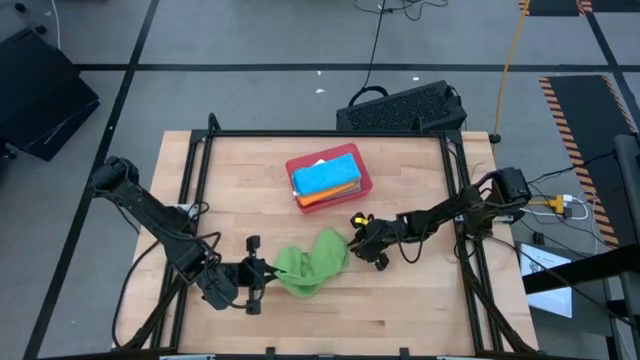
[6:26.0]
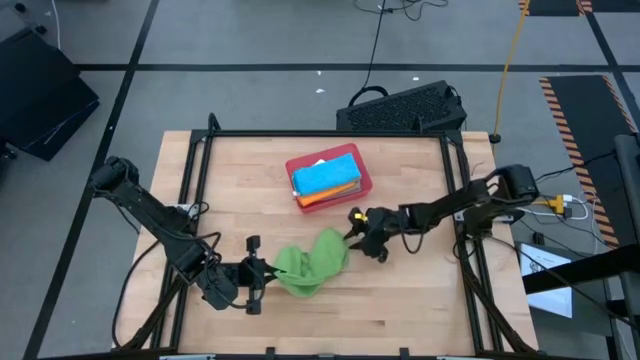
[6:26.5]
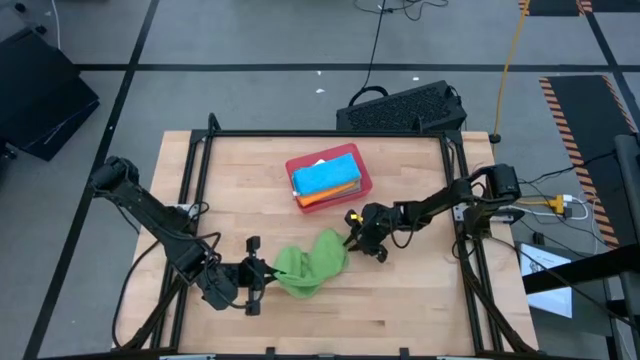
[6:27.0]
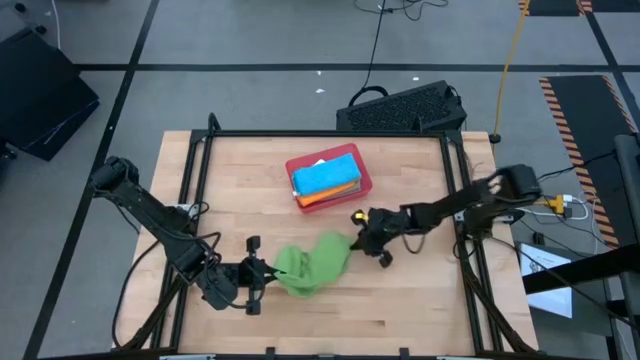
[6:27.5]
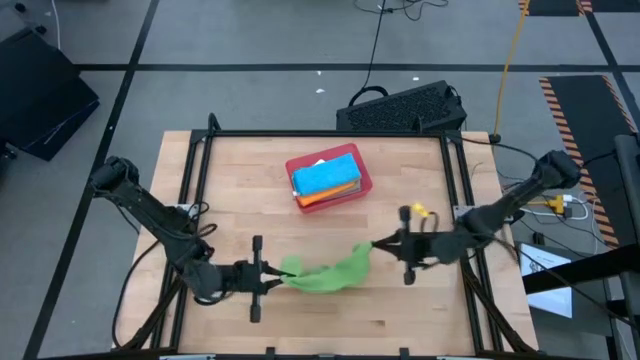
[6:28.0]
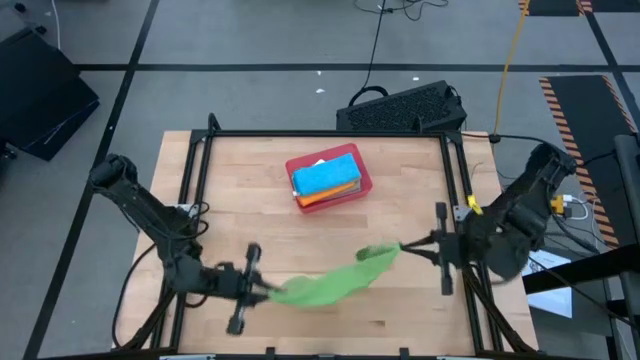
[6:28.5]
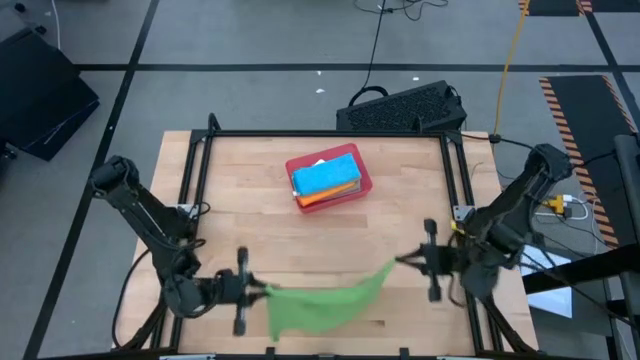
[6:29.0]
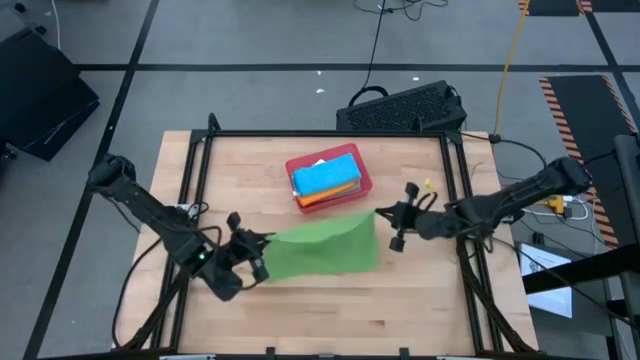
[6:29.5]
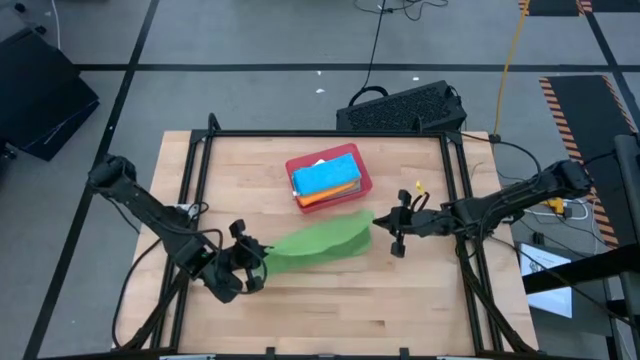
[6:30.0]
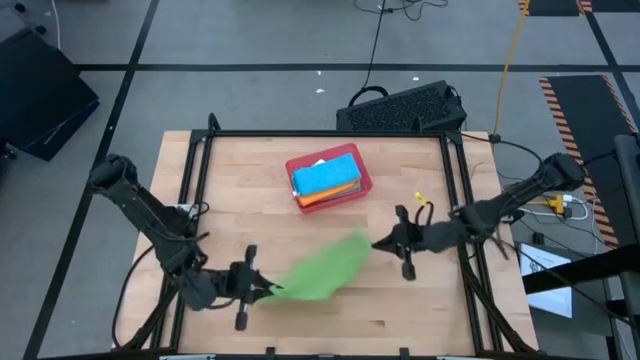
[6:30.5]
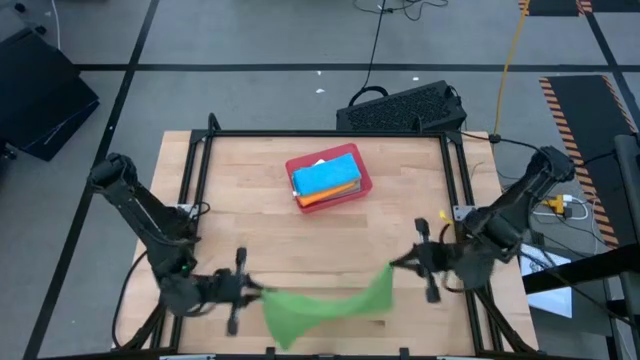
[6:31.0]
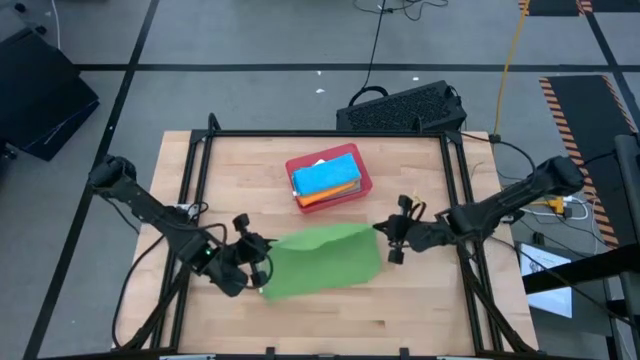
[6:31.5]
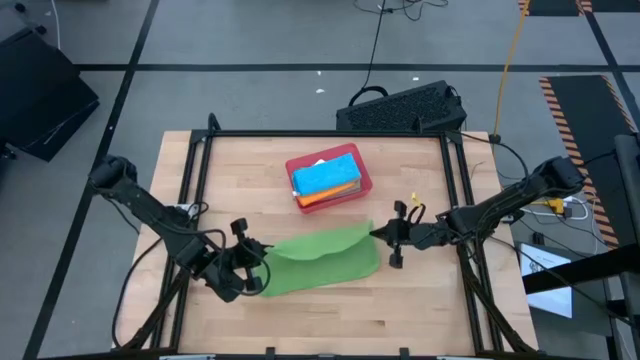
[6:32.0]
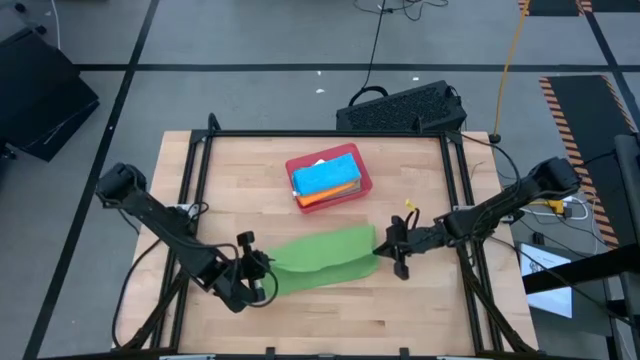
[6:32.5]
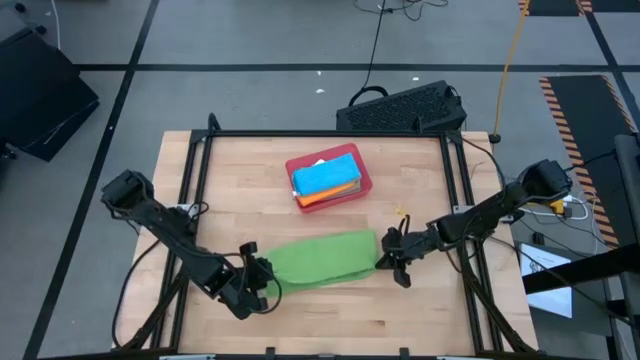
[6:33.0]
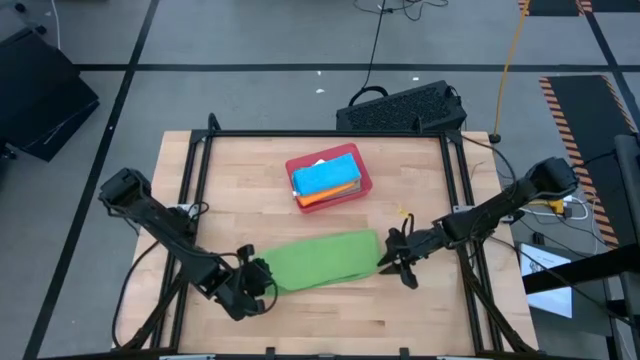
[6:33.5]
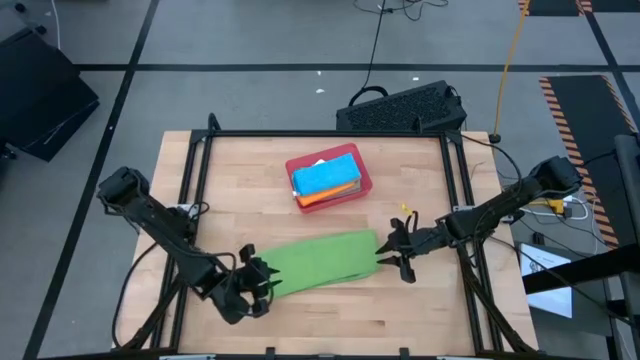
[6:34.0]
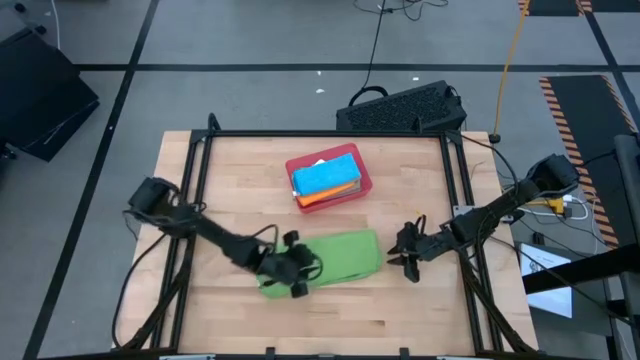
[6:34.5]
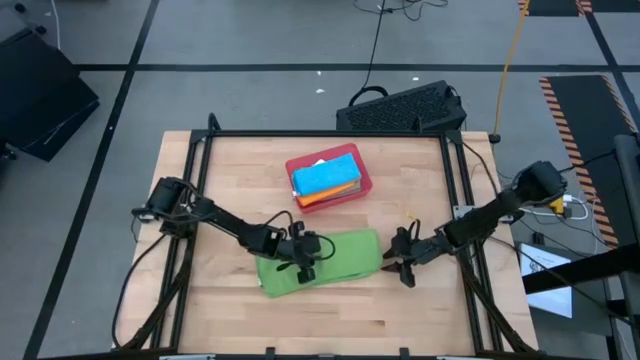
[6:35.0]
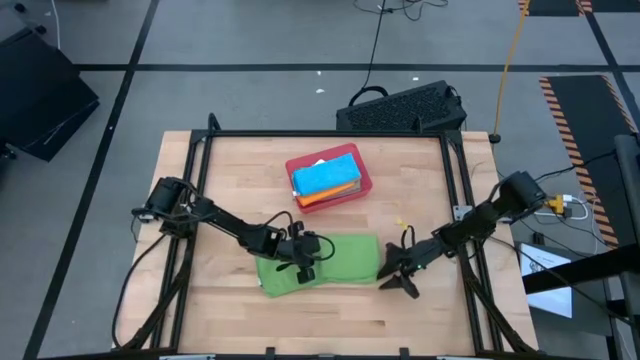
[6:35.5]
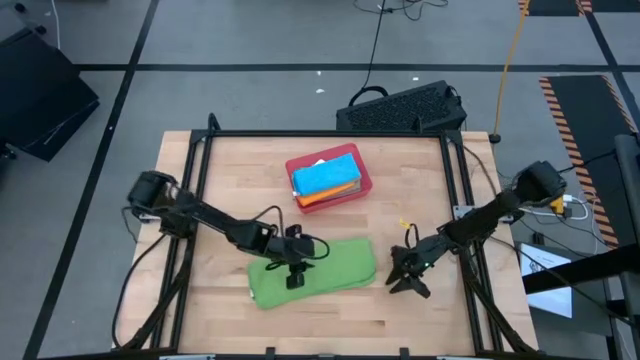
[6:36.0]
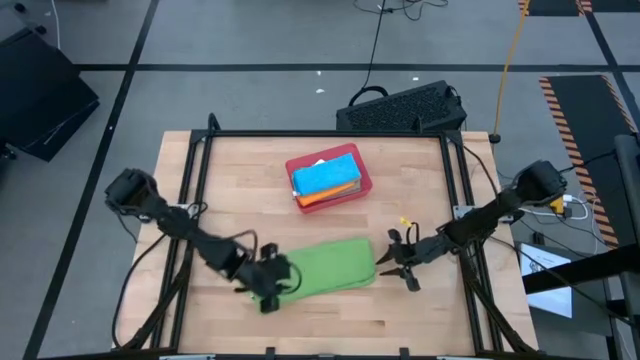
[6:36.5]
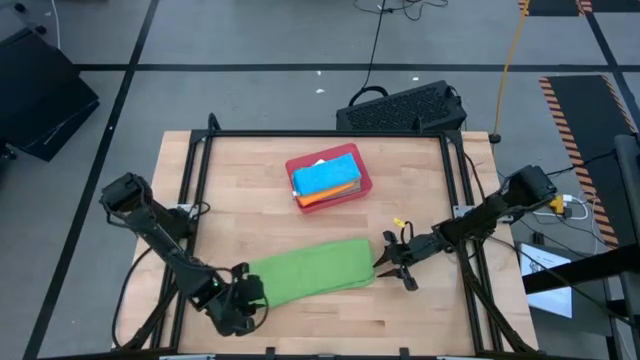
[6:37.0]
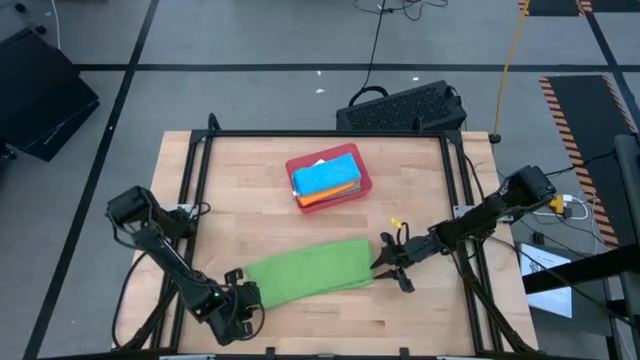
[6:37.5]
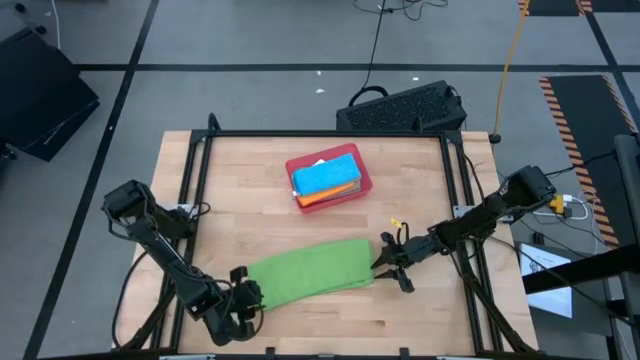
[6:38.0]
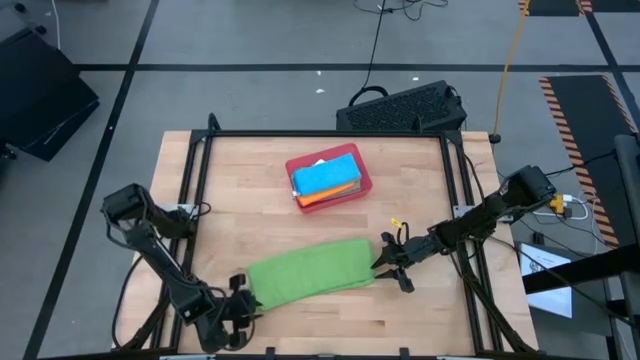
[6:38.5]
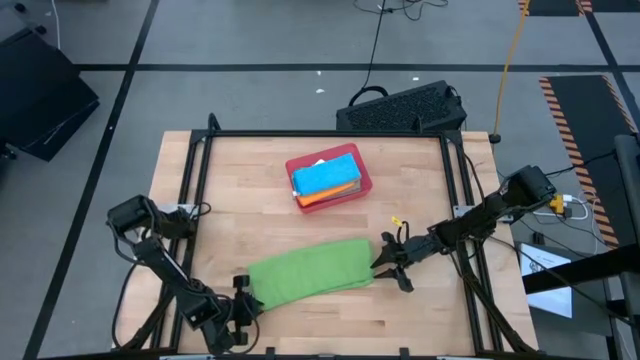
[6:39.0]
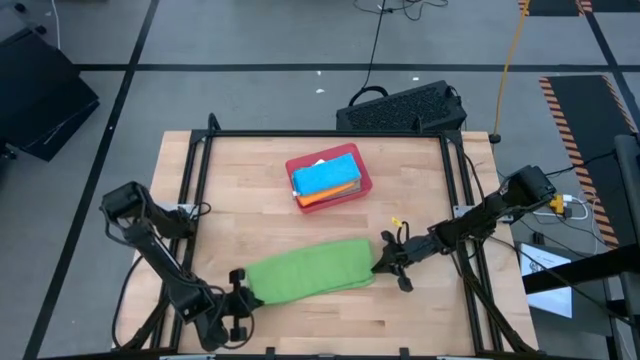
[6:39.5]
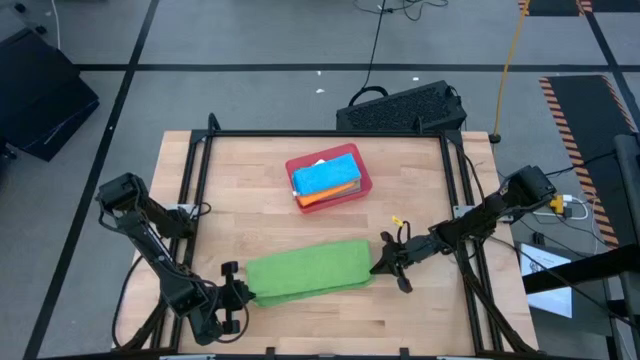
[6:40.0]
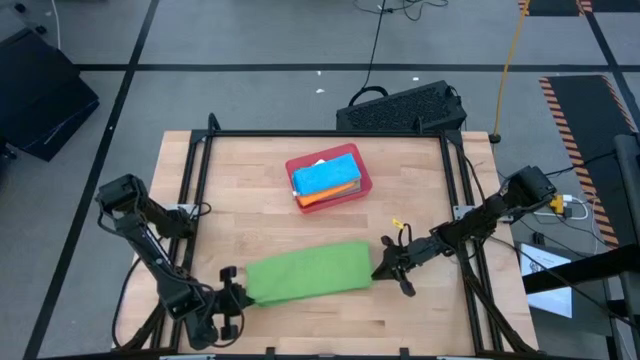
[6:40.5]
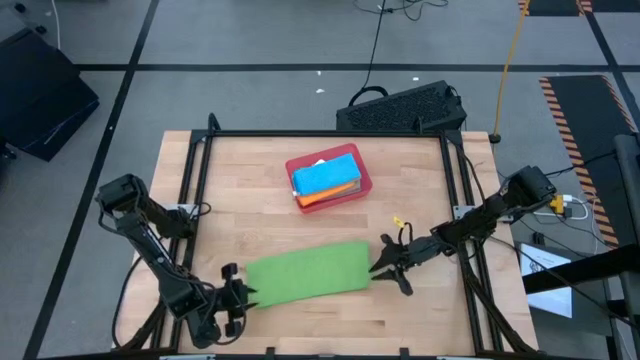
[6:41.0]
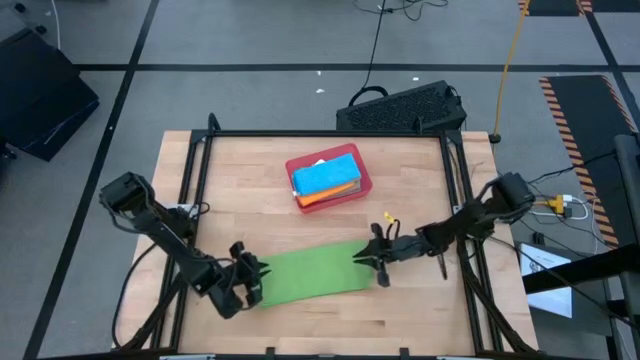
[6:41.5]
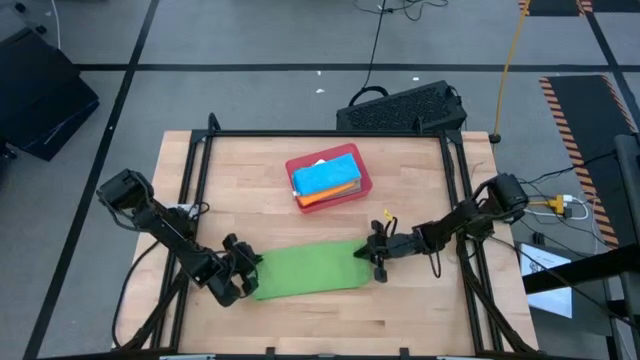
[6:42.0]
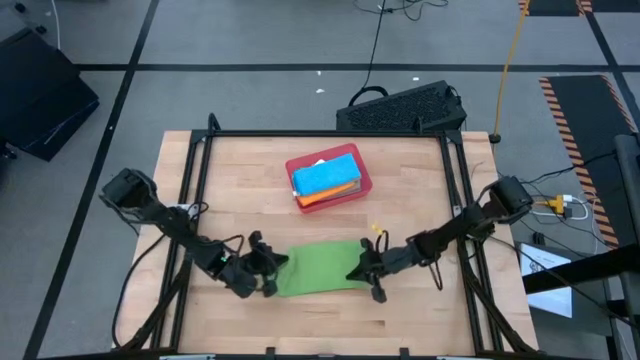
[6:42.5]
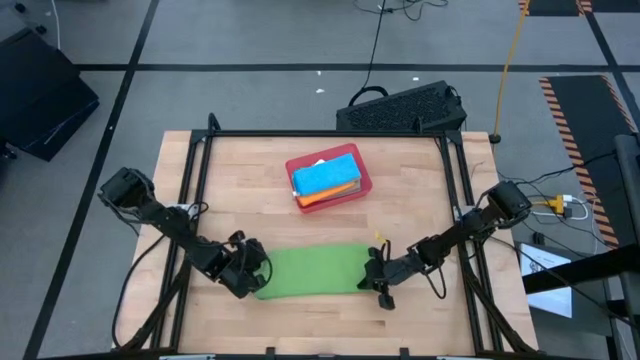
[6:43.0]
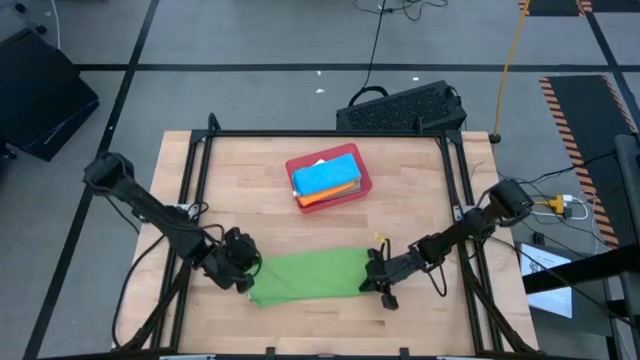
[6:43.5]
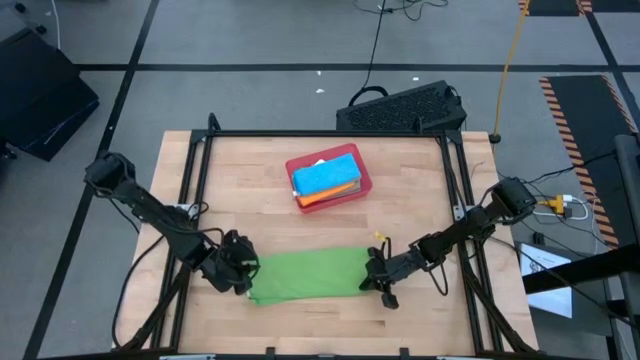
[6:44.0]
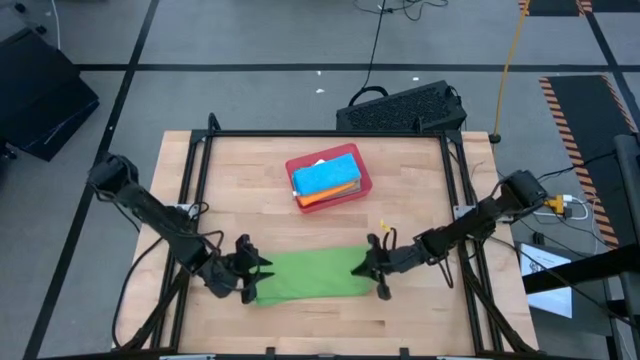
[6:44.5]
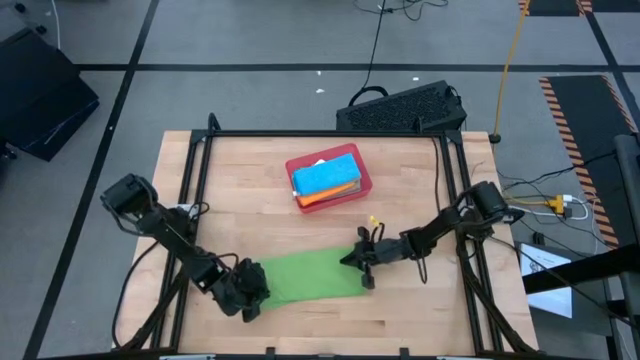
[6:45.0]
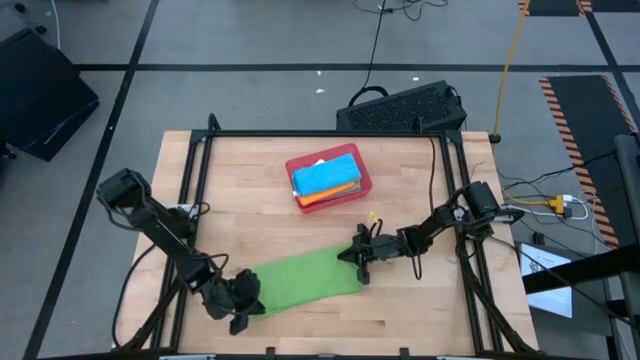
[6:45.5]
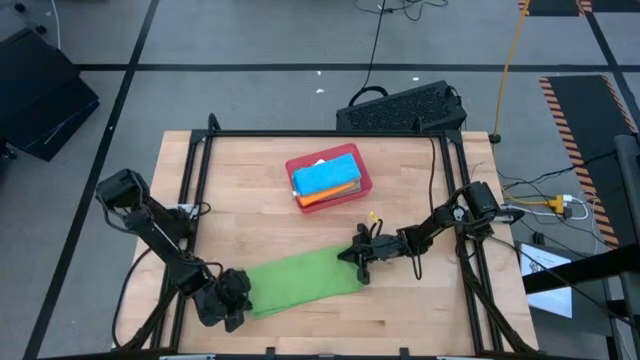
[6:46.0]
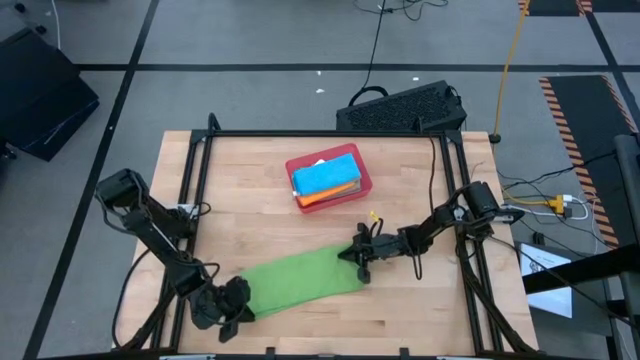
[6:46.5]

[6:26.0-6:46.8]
Task: Fold microfiber towels
Fold the green microfiber cloth
